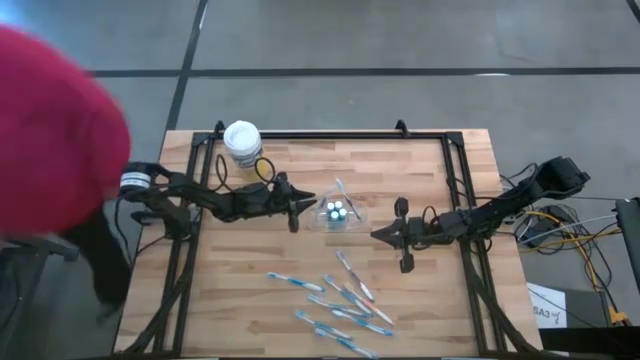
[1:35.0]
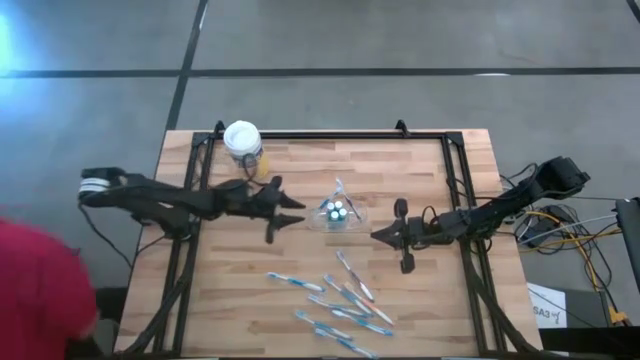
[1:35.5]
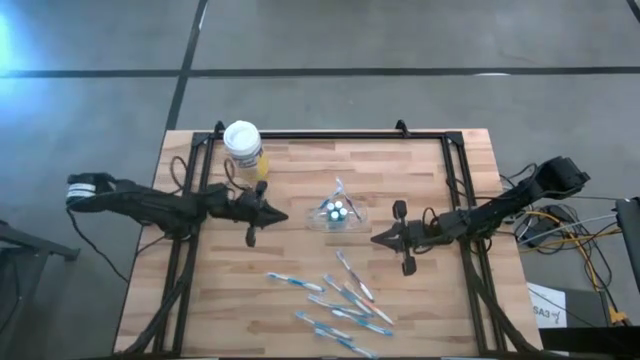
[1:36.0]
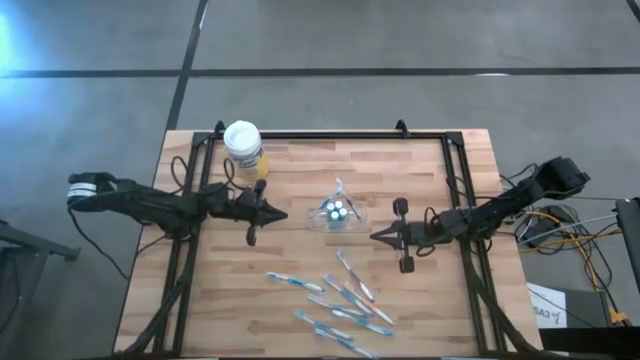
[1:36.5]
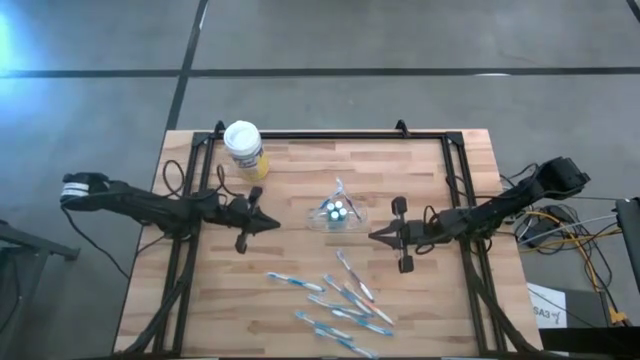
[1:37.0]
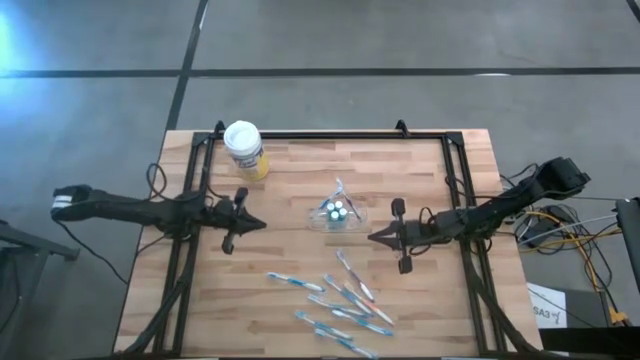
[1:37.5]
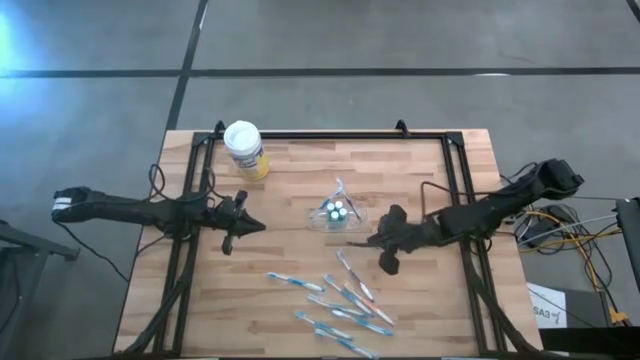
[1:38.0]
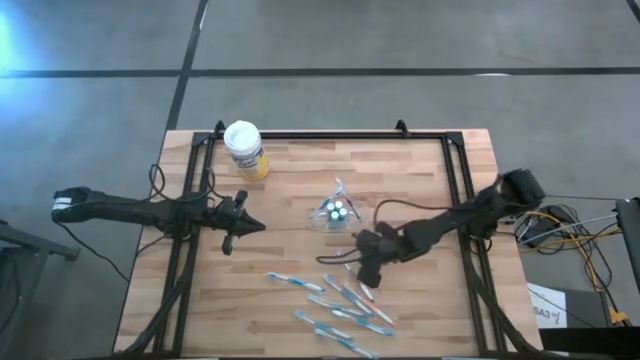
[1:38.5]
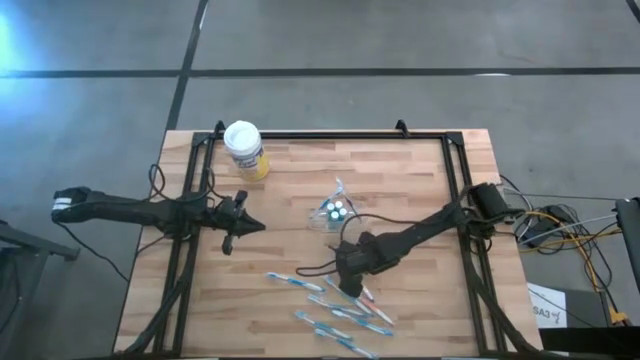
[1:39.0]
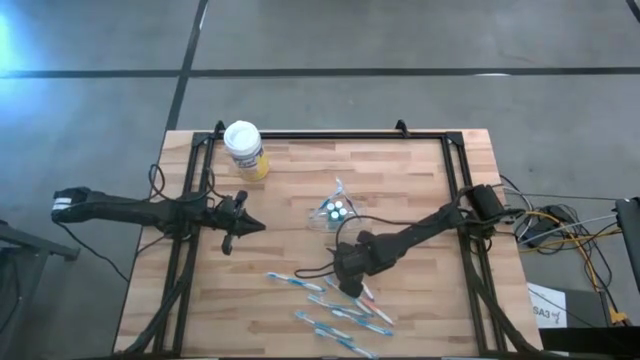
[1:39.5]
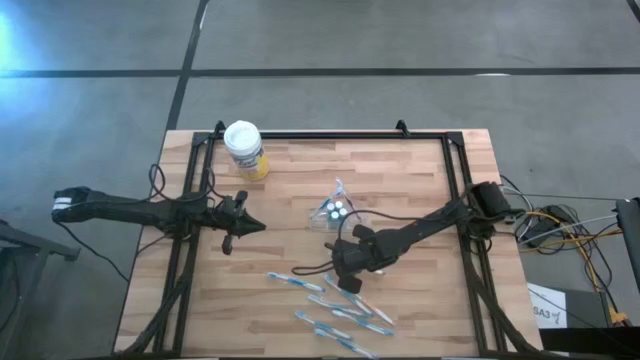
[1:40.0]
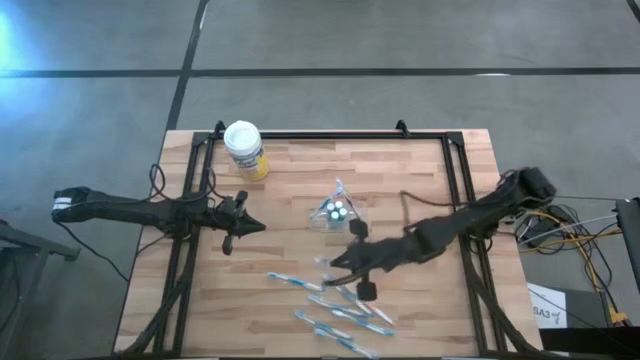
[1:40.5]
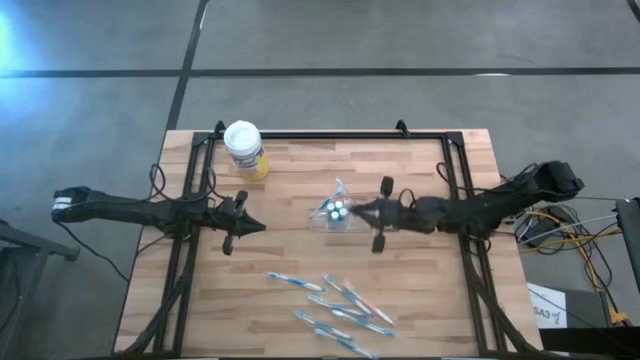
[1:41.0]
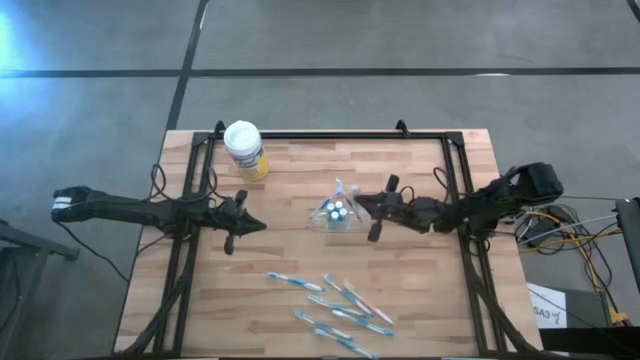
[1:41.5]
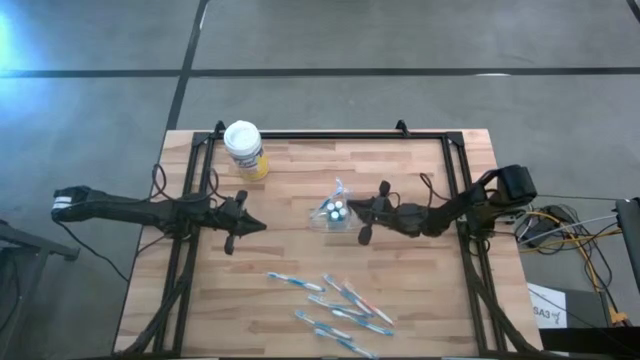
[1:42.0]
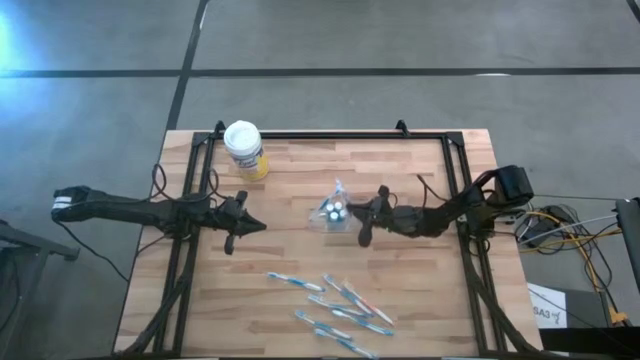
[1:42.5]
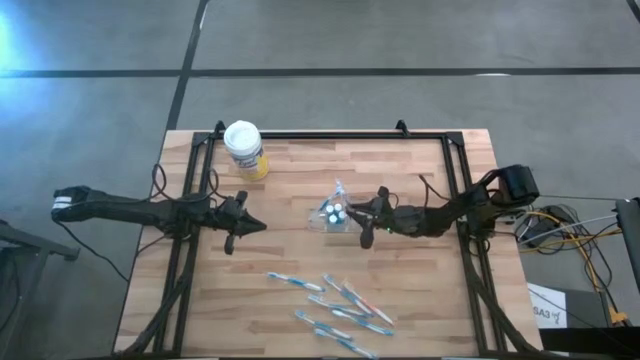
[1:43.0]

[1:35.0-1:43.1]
Task: Pick & Place toothbrushing station
Put the purple toothbrush into the right compartment of the transparent organizer

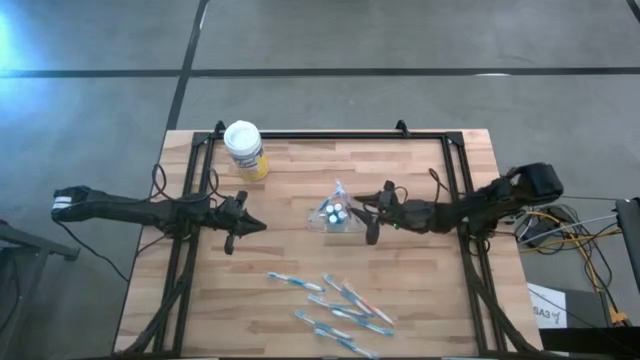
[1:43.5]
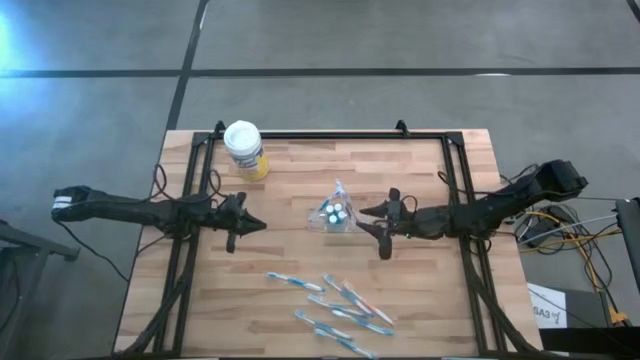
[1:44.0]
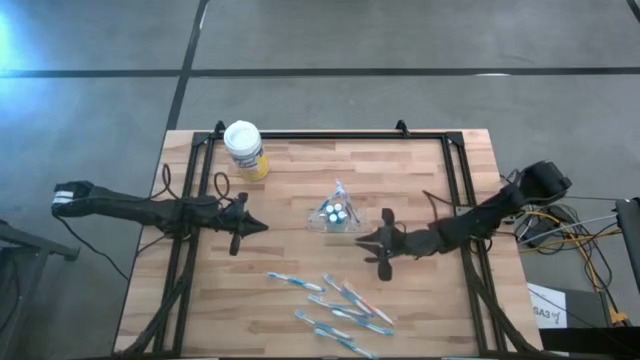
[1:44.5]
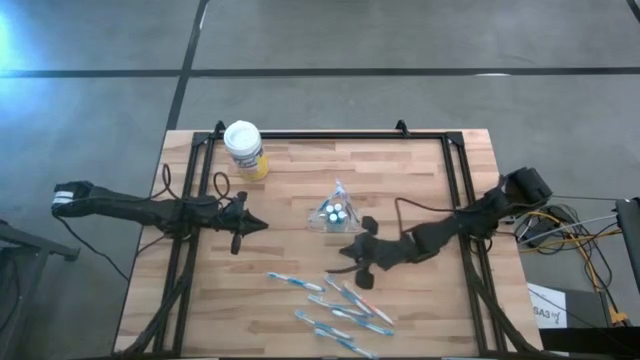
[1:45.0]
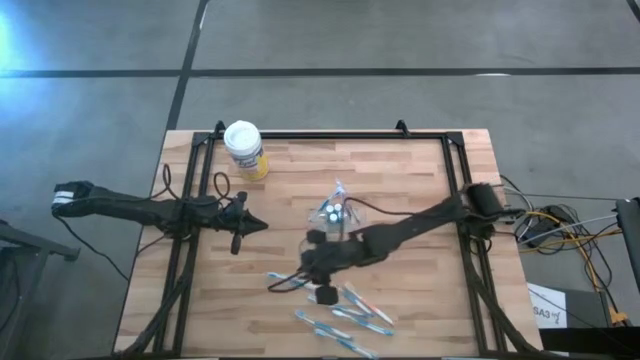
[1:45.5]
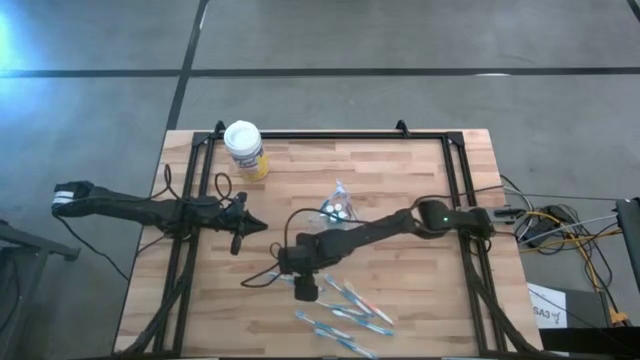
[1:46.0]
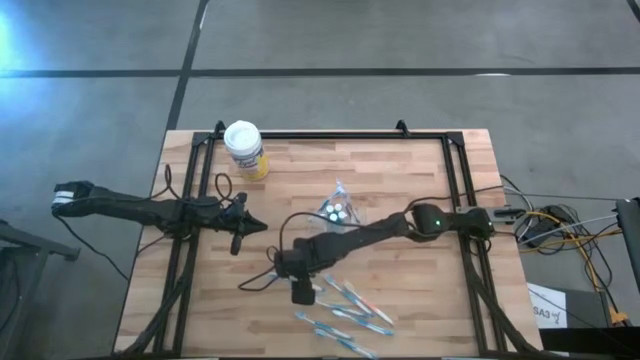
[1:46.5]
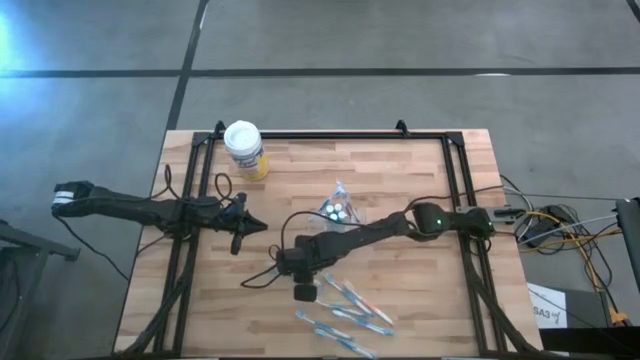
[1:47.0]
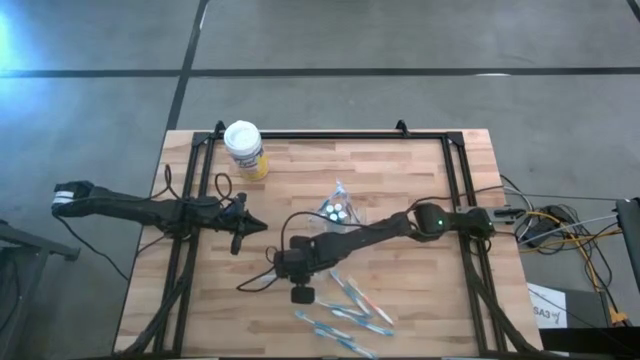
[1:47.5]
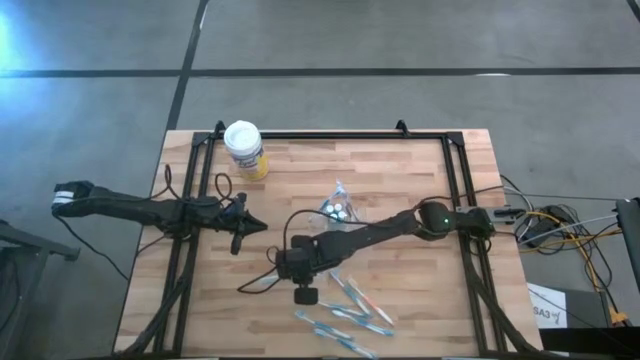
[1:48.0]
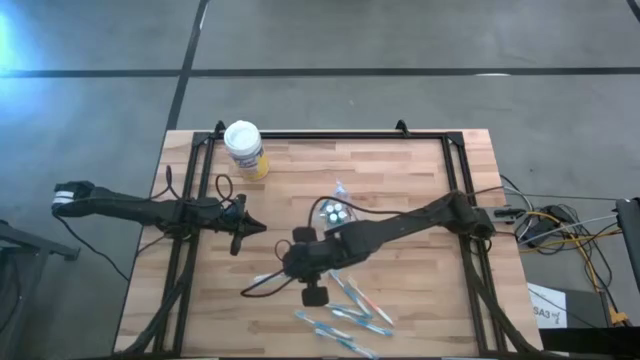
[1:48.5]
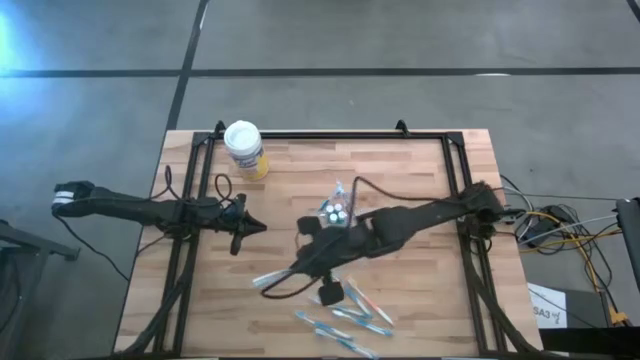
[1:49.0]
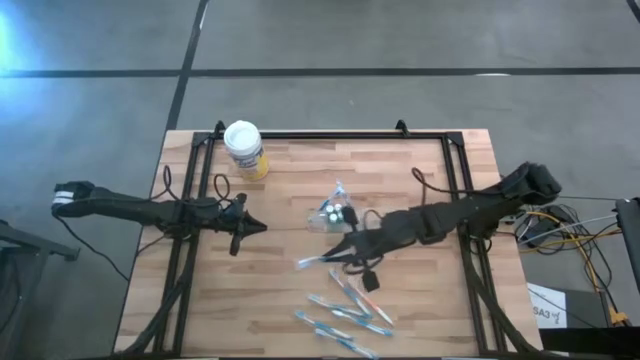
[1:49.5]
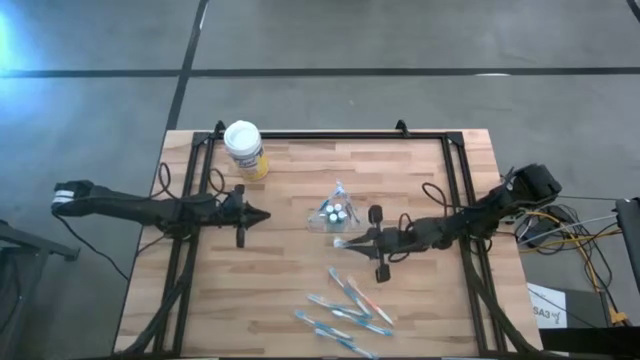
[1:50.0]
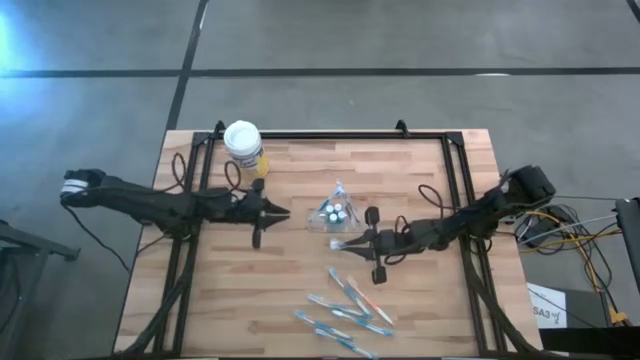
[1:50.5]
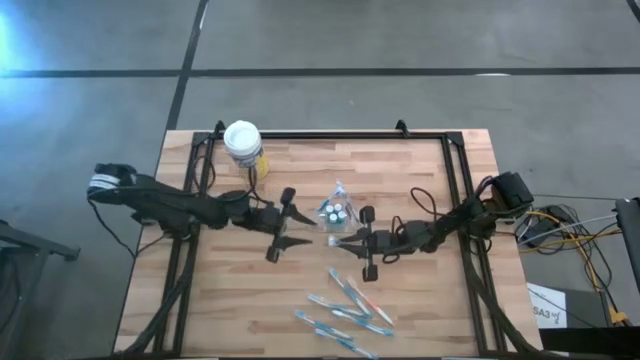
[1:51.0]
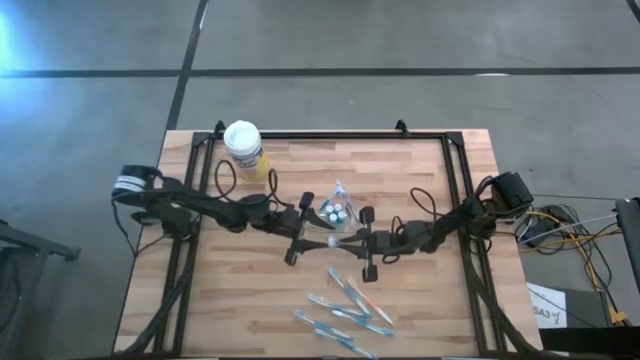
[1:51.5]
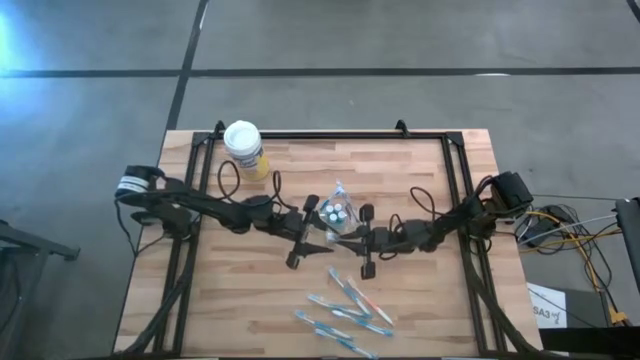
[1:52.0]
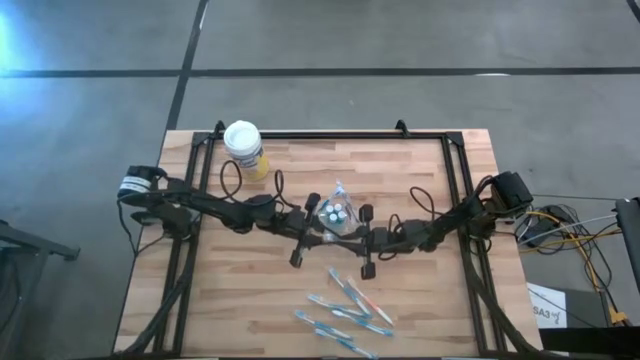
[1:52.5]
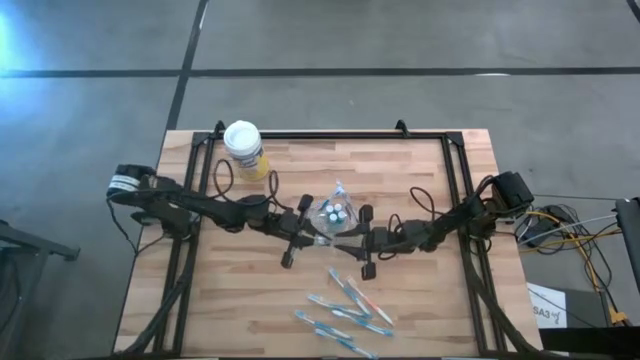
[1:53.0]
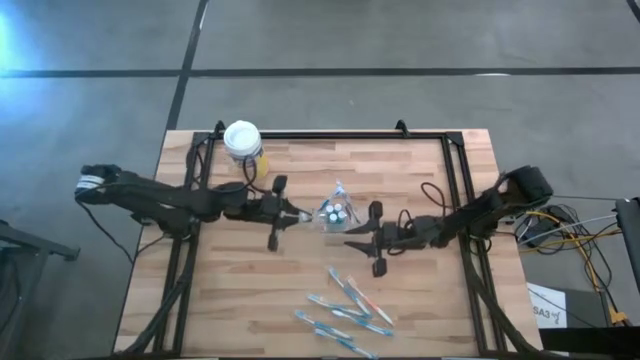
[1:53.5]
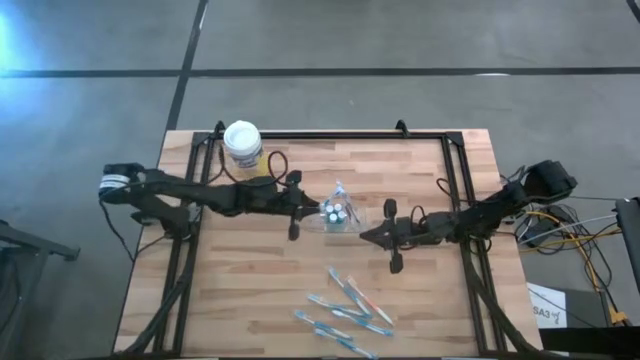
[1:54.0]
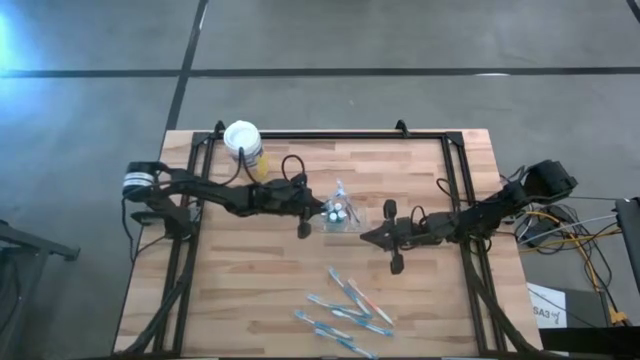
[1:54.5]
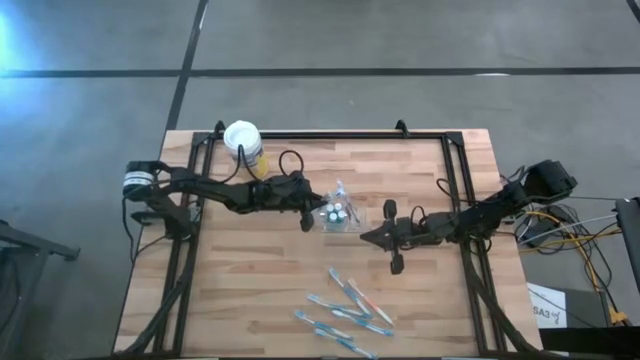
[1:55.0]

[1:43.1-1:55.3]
Put the blue toothbrush into the left compartment of the transparent organizer
